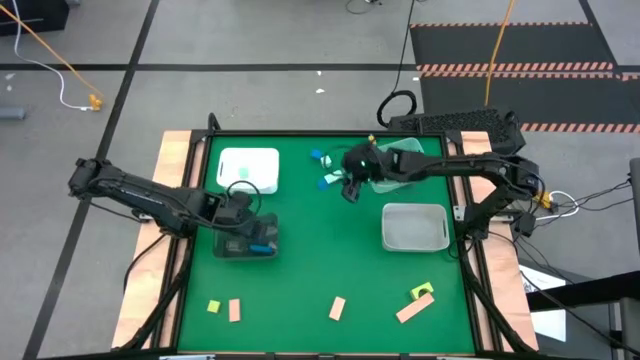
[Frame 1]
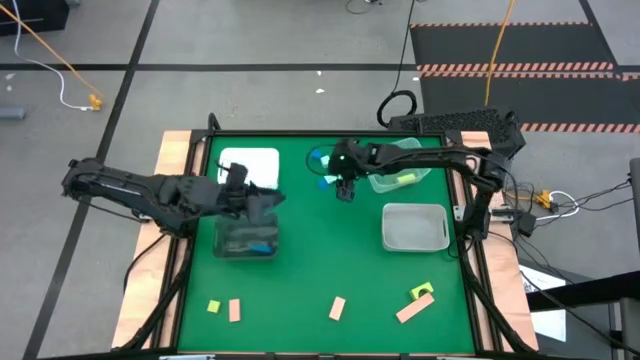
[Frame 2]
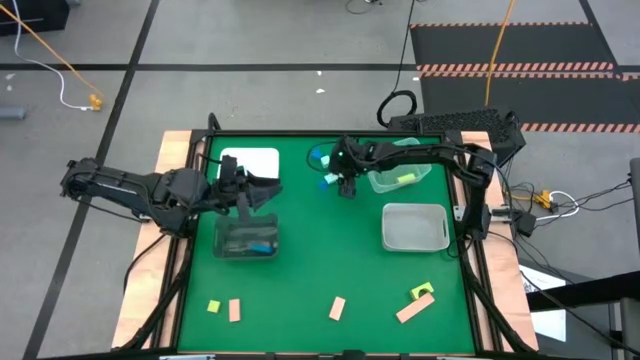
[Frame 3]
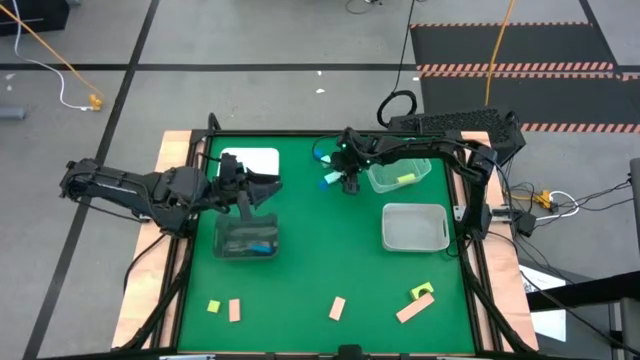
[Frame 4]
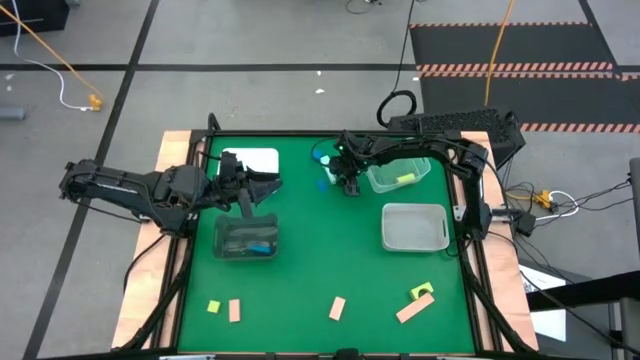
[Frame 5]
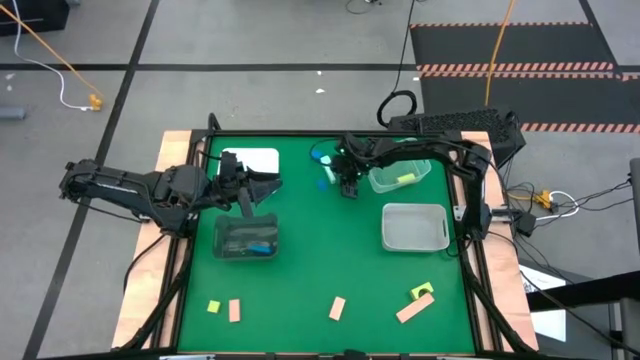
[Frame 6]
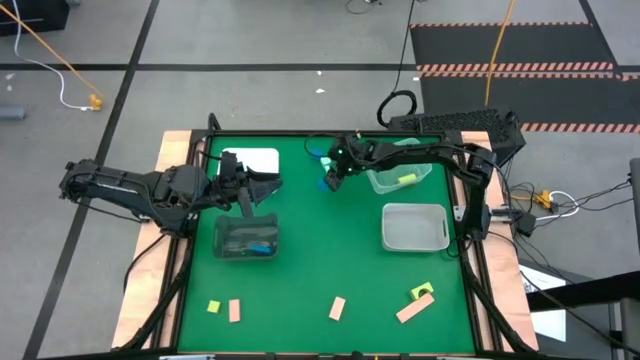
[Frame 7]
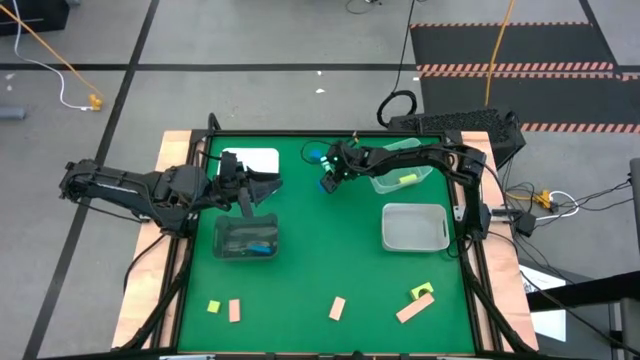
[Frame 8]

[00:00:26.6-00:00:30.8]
Task: Sort & place blocks by color
Put the light blue block into the white bin

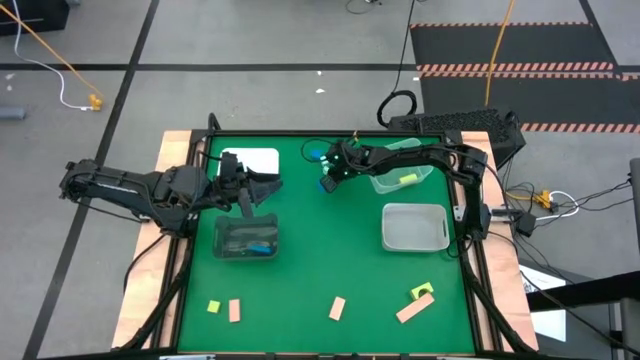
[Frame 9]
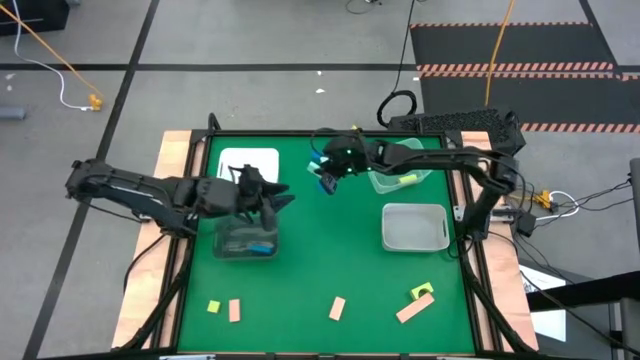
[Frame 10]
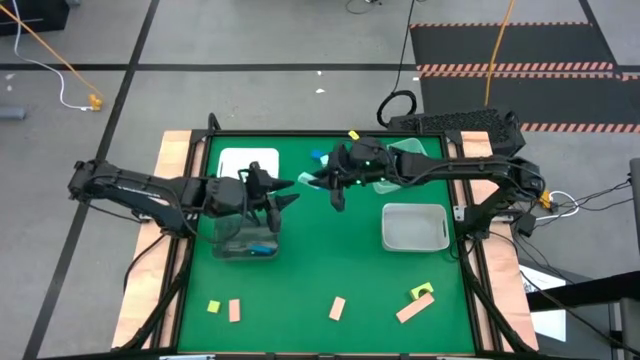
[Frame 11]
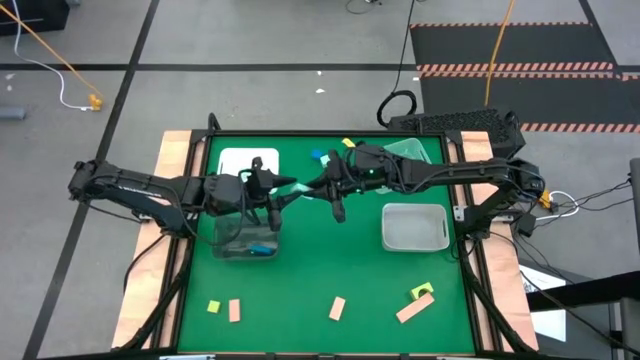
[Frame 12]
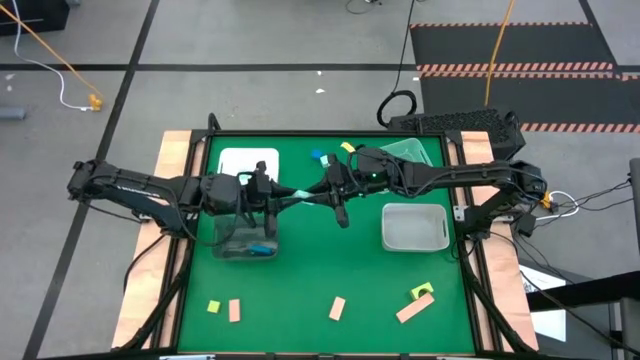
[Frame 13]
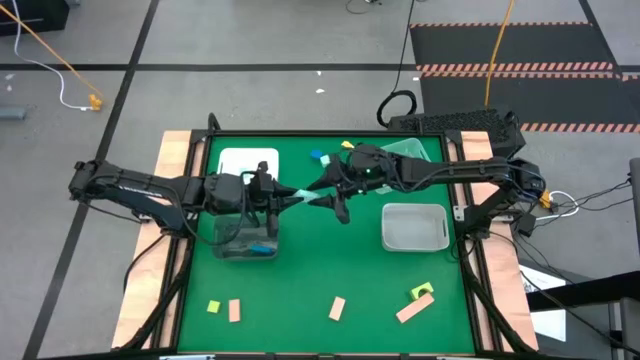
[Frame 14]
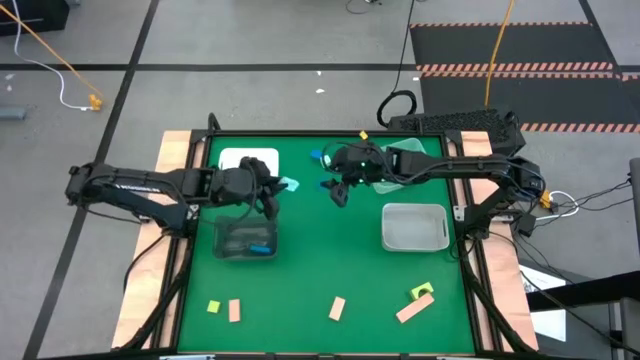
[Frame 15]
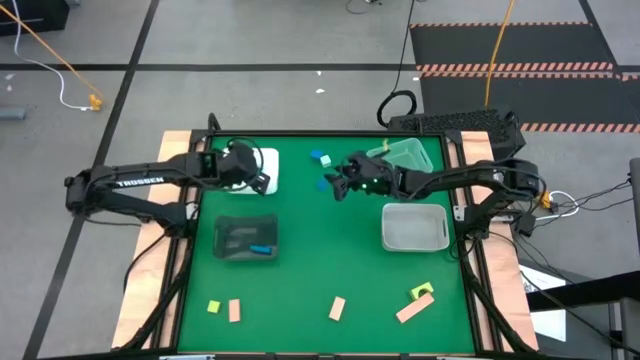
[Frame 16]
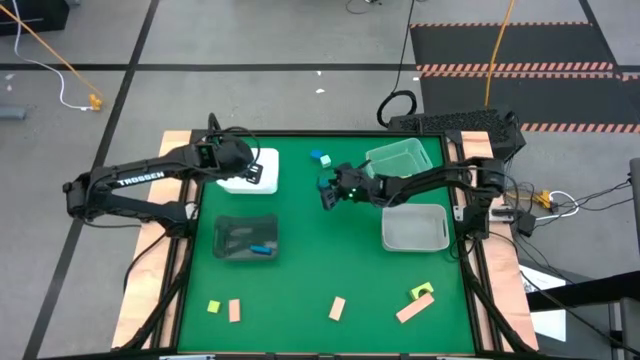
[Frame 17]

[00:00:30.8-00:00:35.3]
Put the light blue block into the white bin

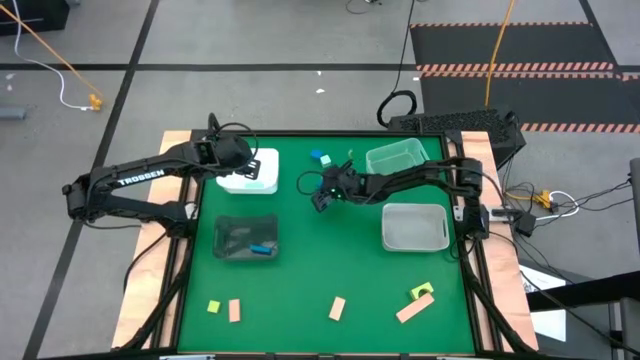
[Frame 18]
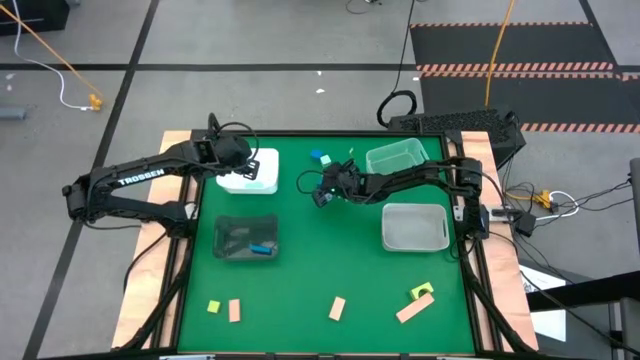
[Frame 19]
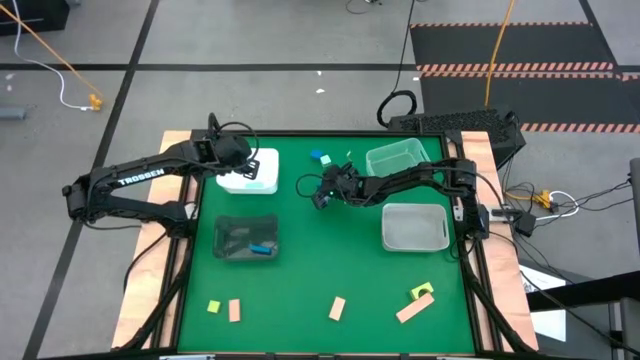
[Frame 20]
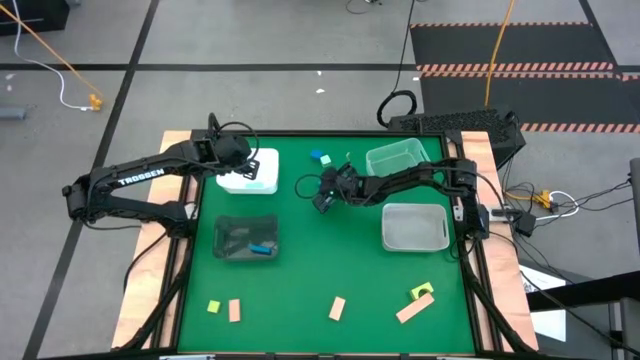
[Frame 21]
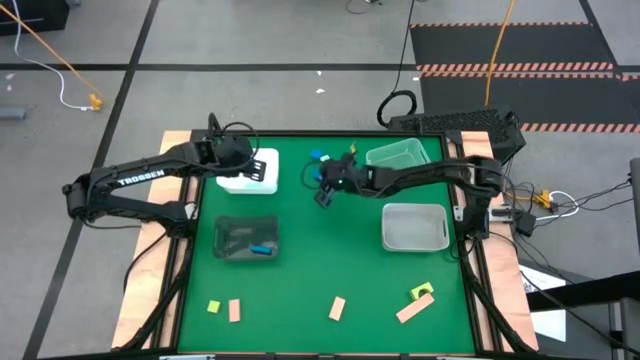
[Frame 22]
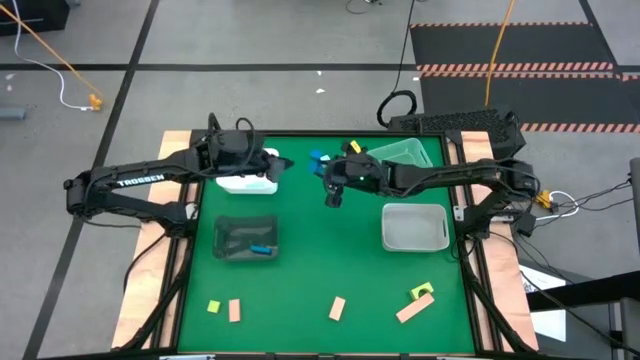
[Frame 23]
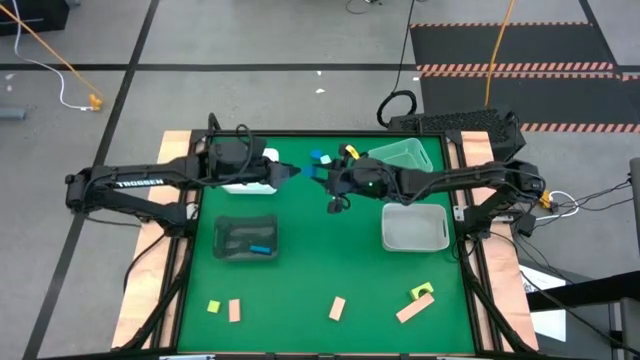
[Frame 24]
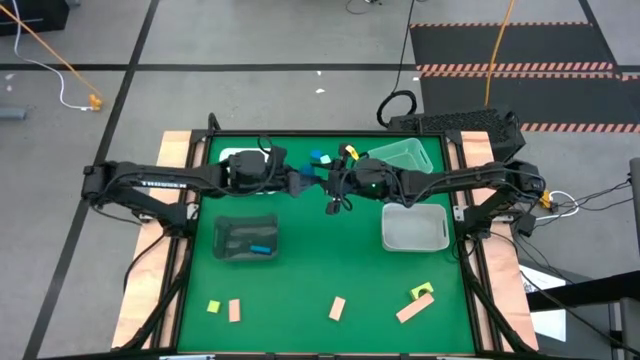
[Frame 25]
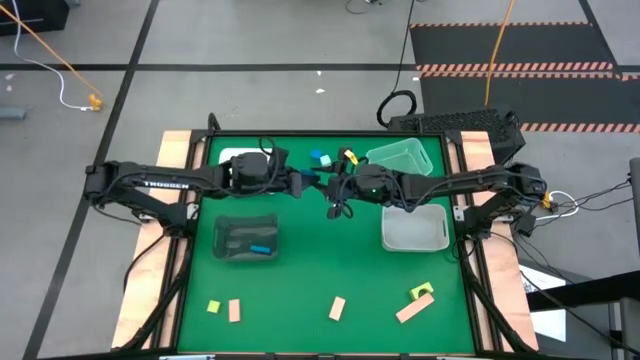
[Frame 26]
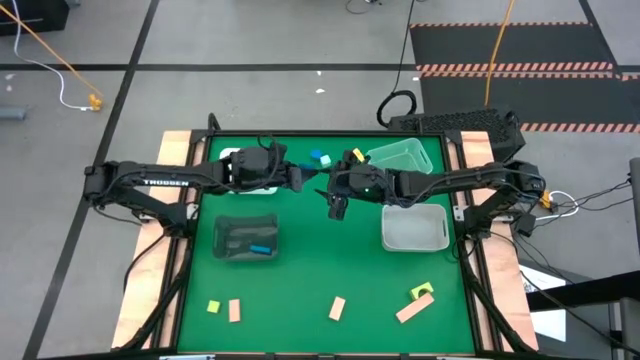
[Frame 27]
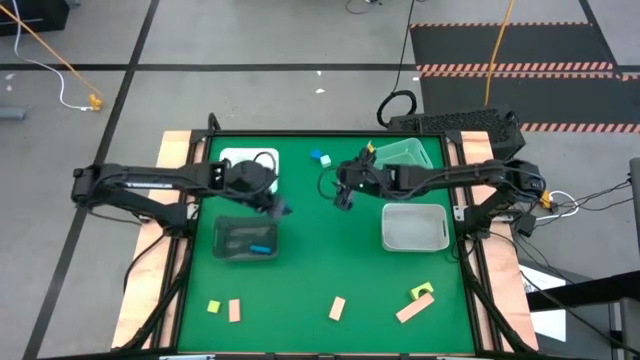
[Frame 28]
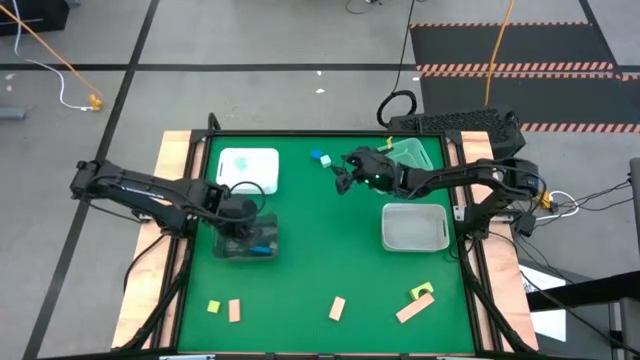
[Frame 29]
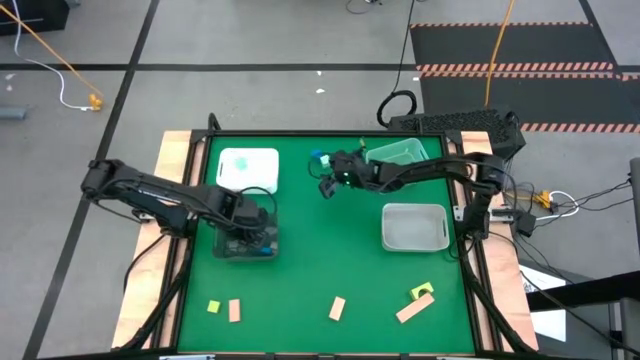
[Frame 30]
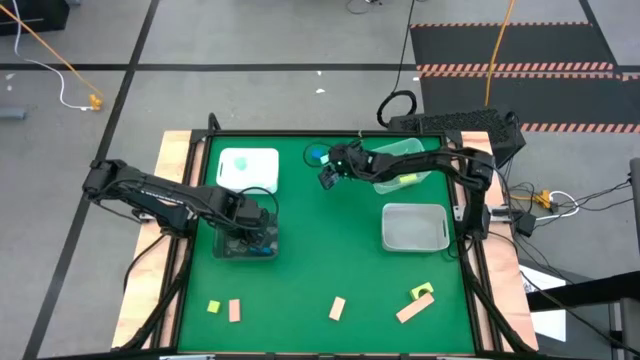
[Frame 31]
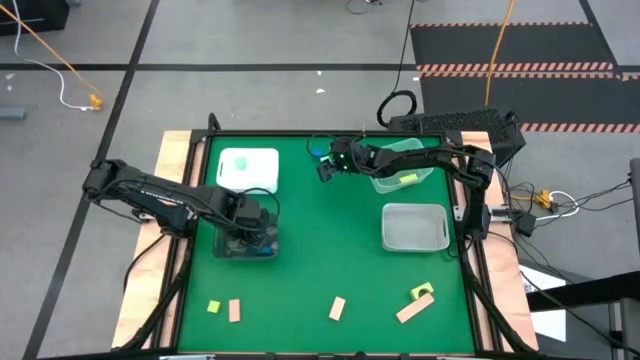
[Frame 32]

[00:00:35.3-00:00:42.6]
Put the blue block into the black bin

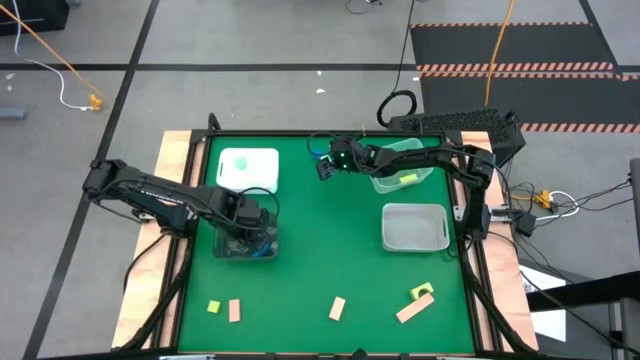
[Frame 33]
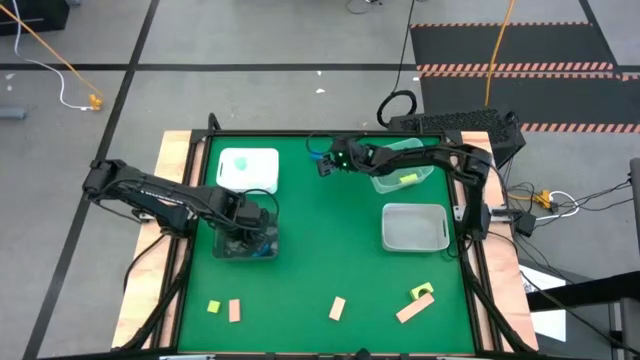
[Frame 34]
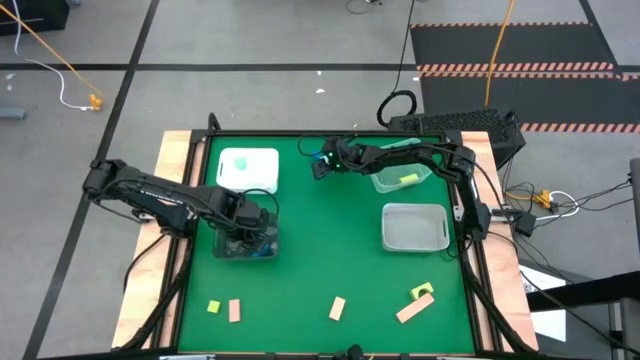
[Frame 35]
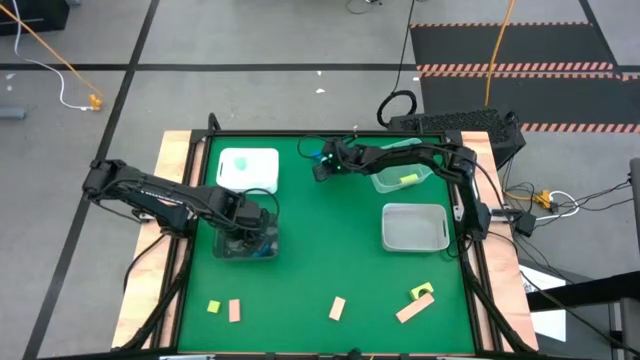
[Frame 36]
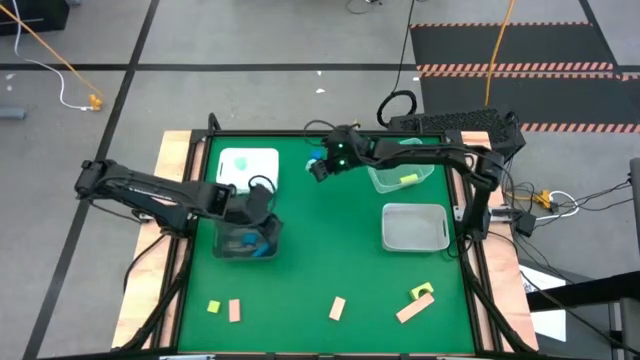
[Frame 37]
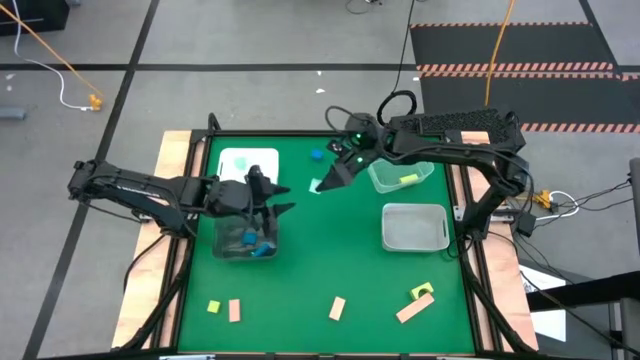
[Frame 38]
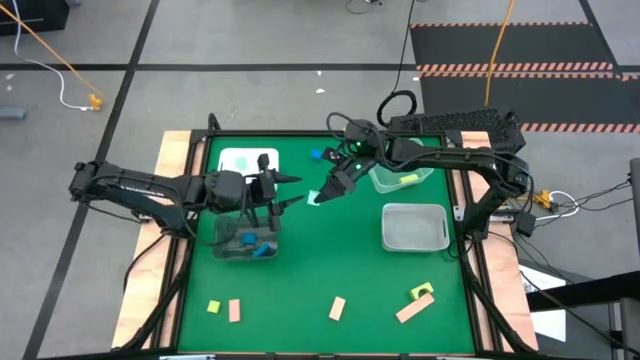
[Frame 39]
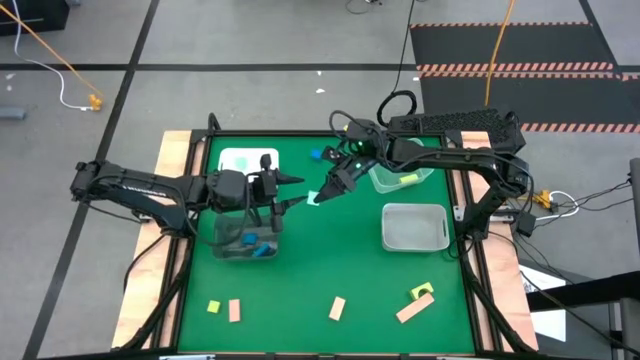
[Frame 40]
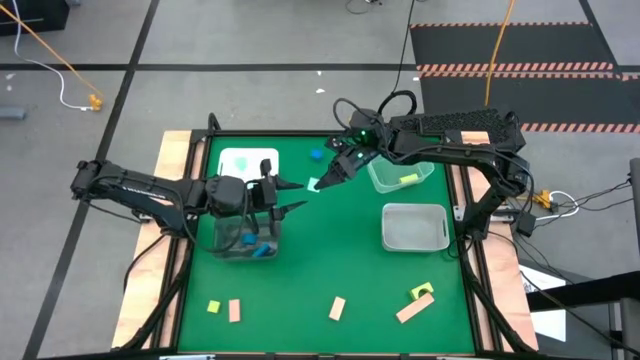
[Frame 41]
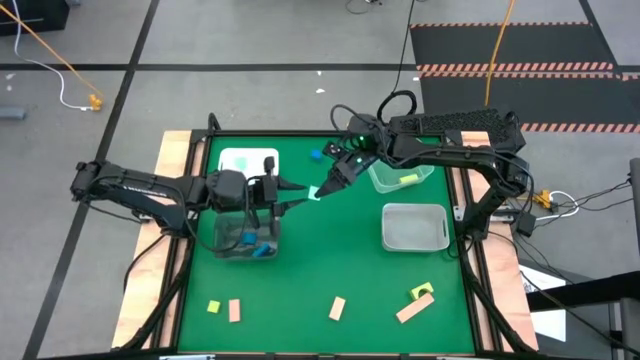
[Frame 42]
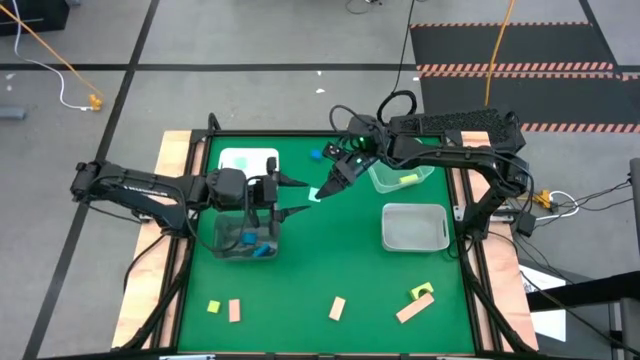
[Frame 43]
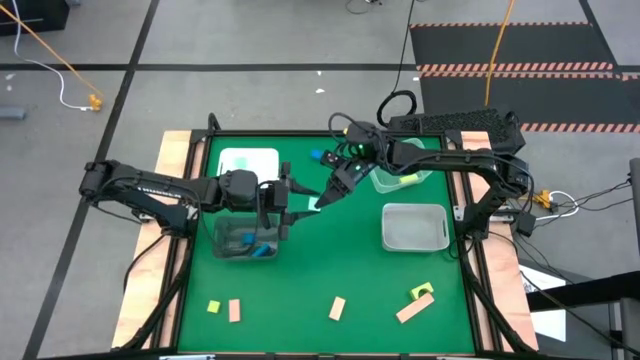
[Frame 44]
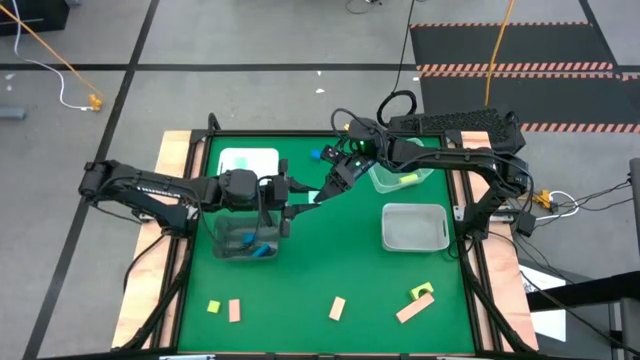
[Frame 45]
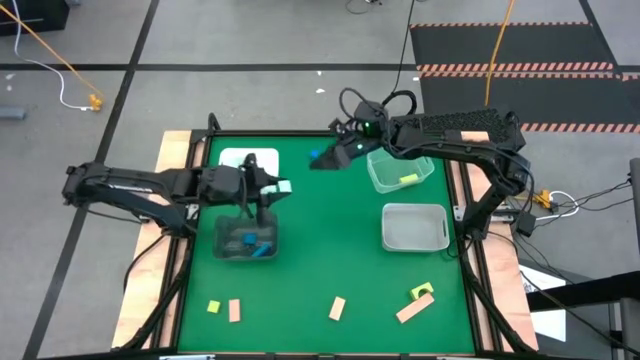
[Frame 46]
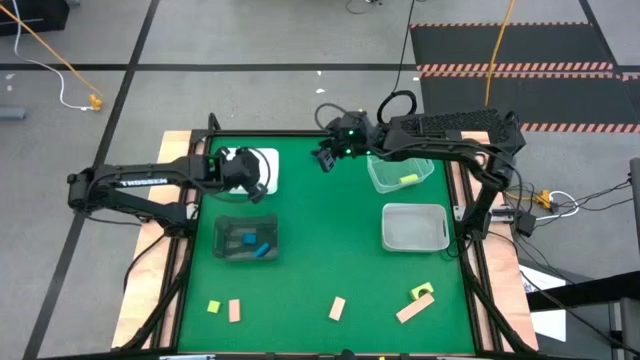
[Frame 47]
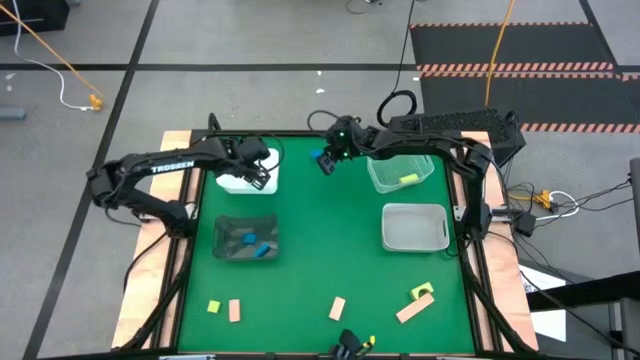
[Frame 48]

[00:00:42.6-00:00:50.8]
Put the light blue block into the white bin
